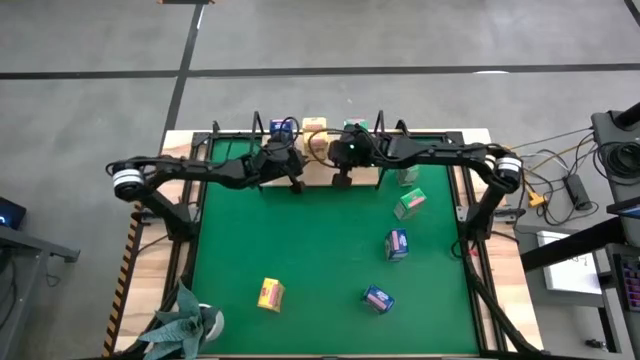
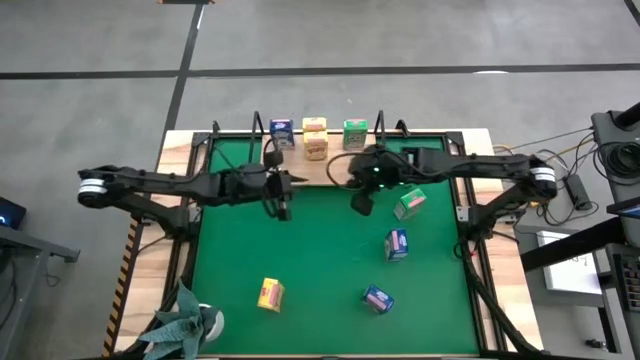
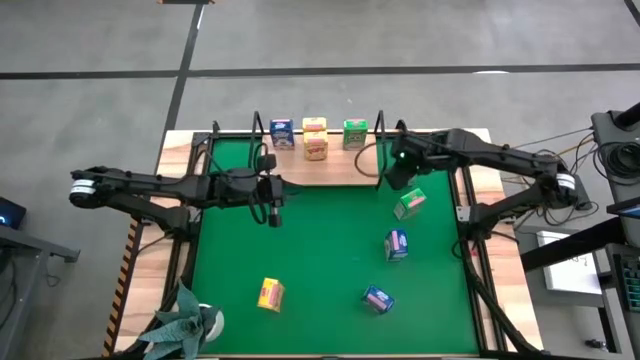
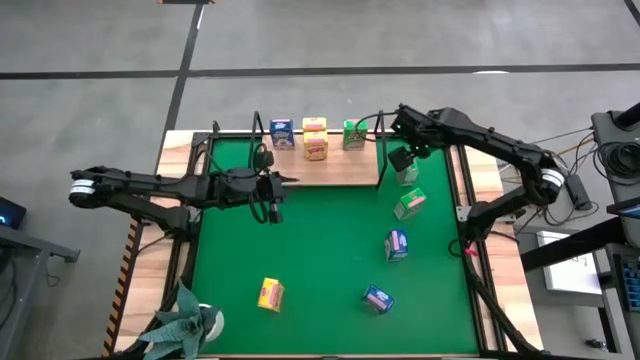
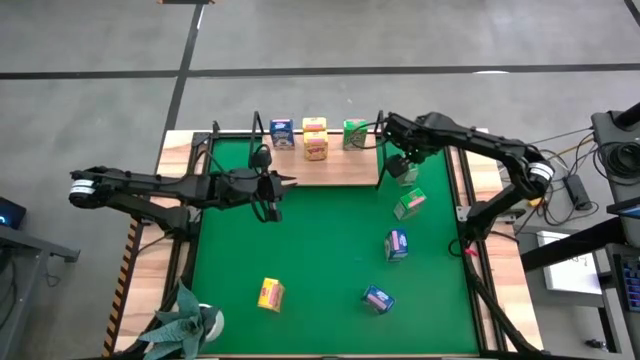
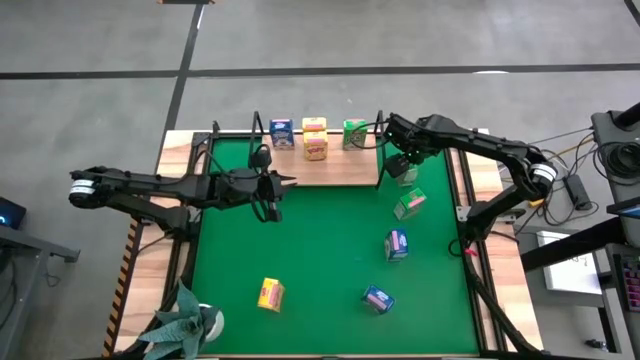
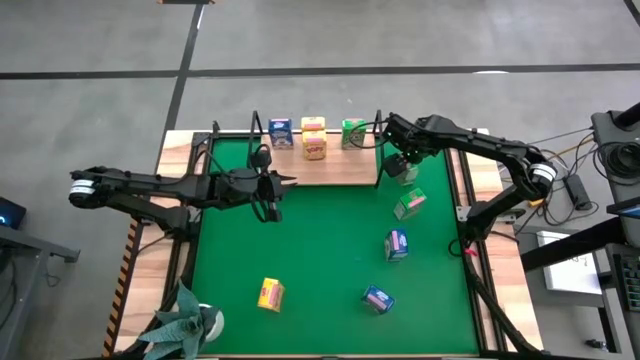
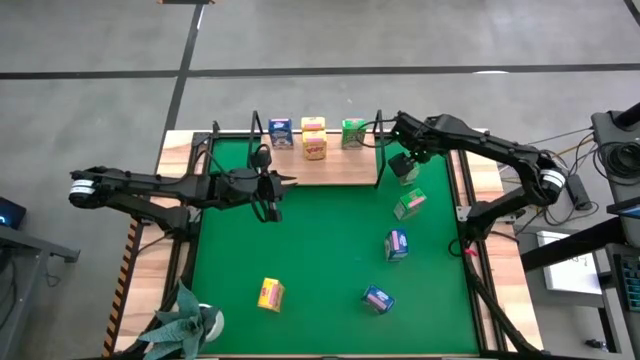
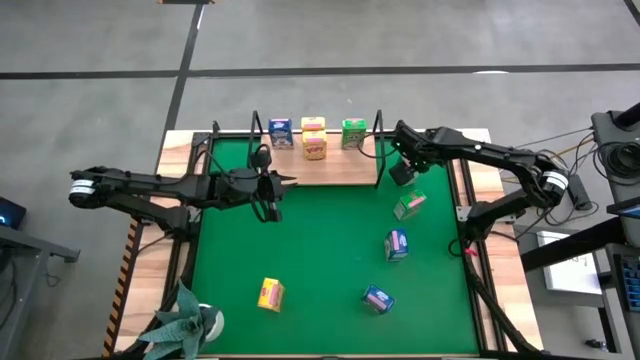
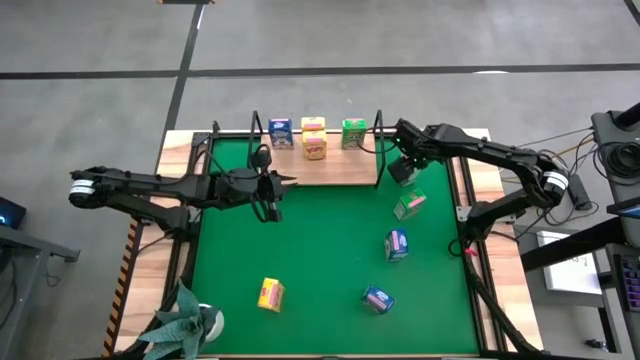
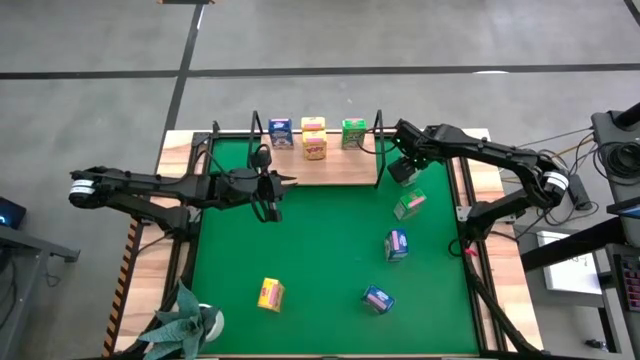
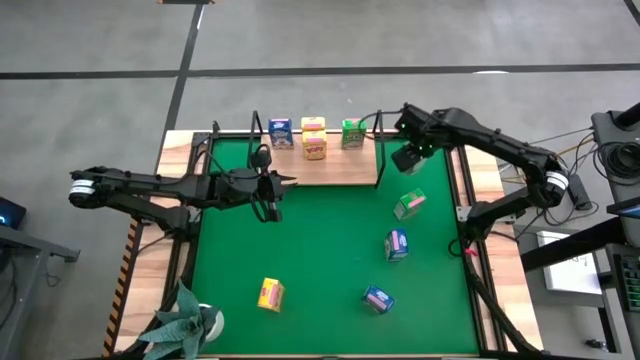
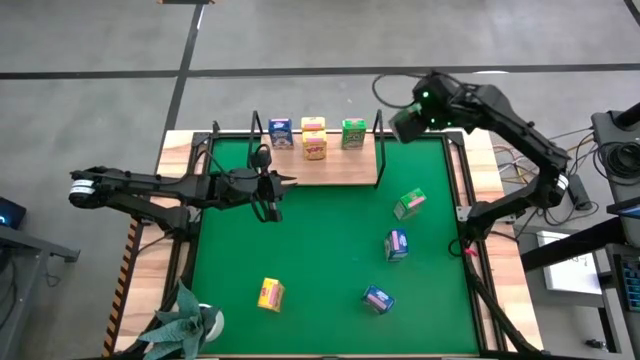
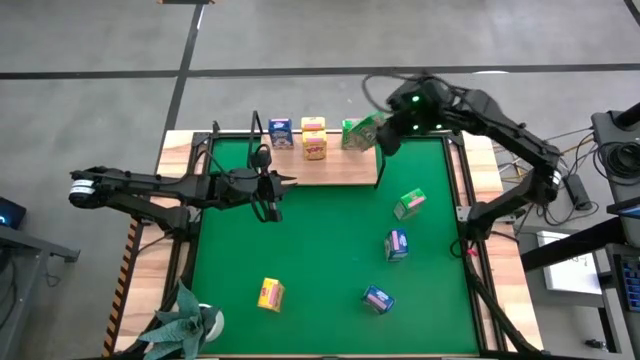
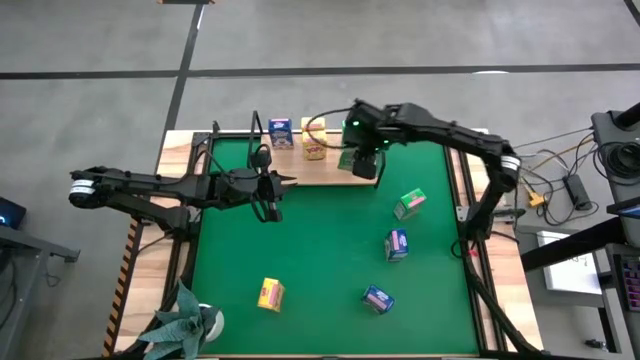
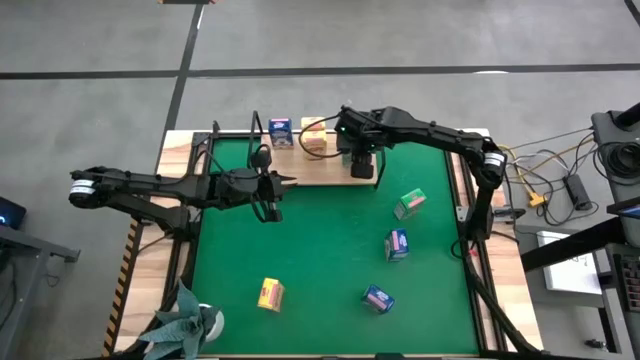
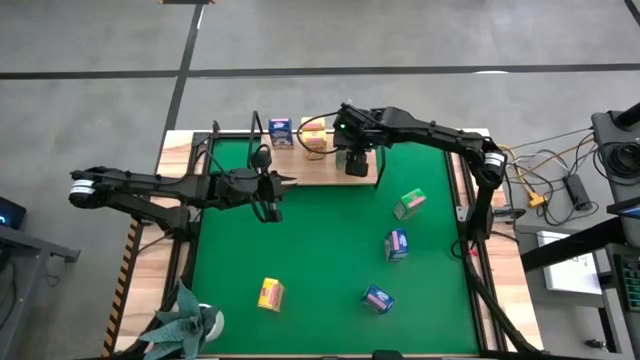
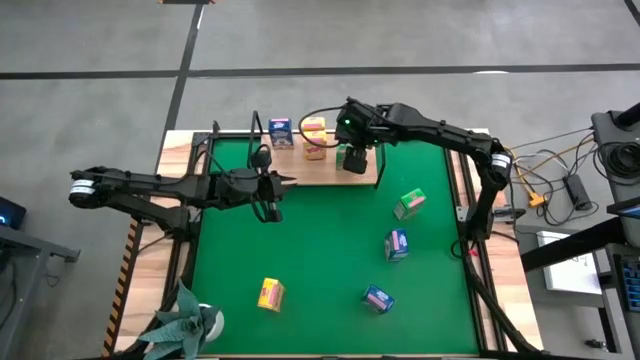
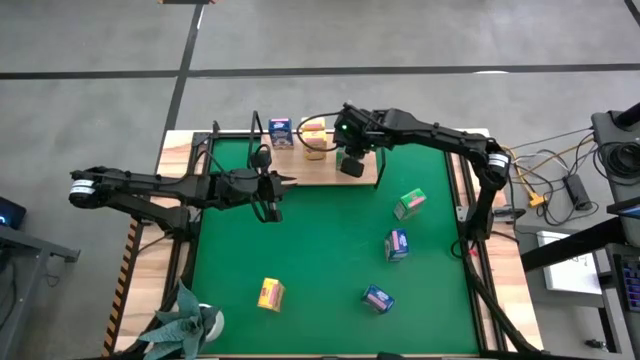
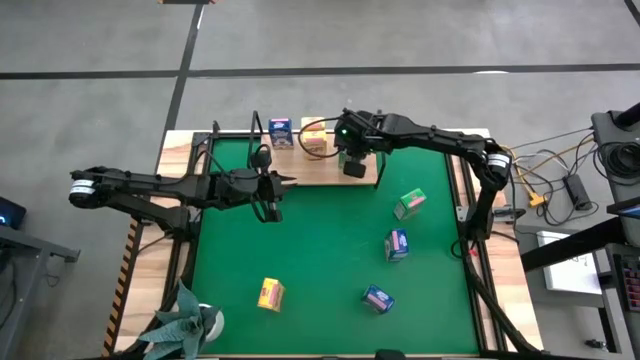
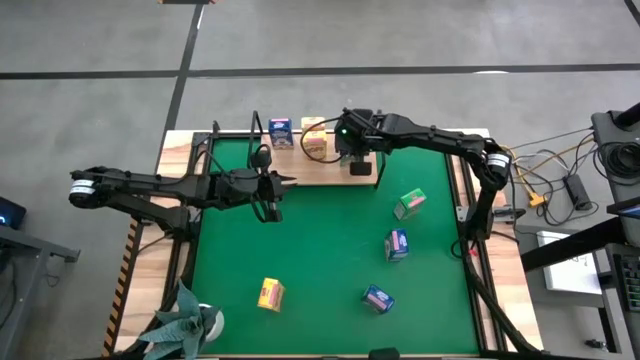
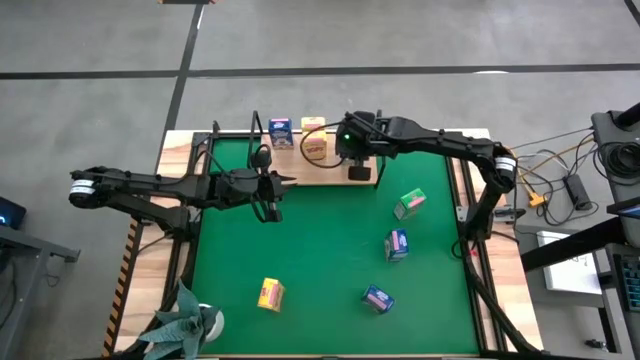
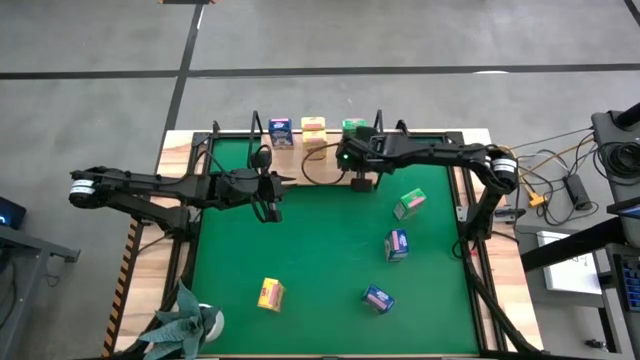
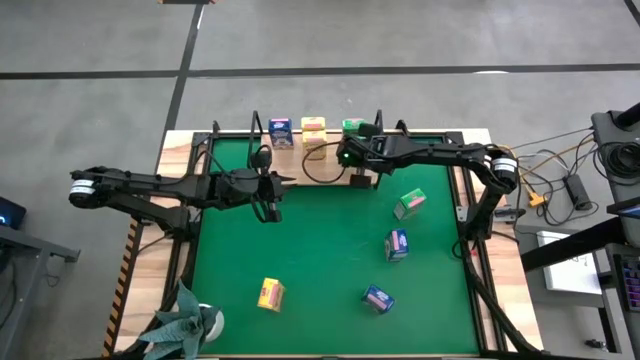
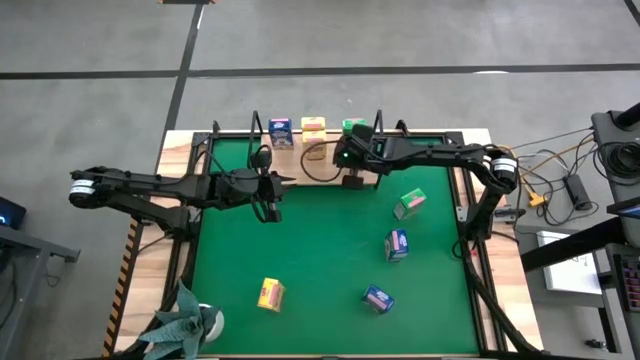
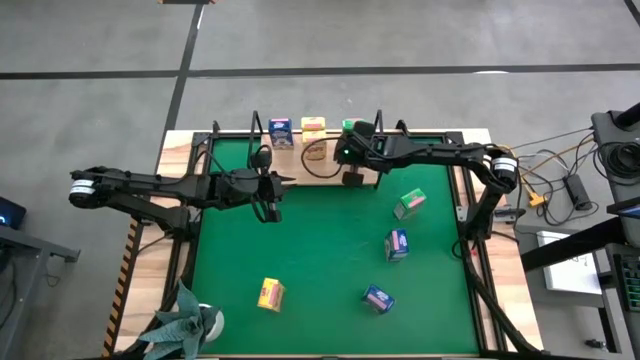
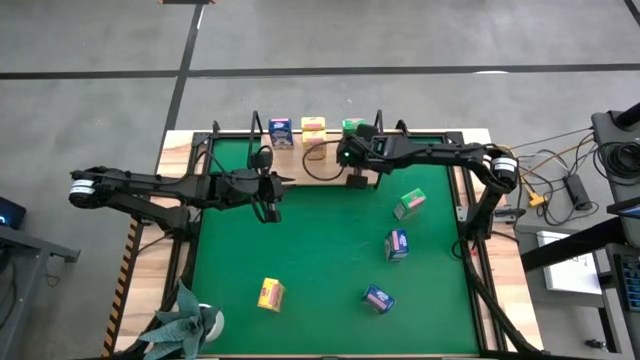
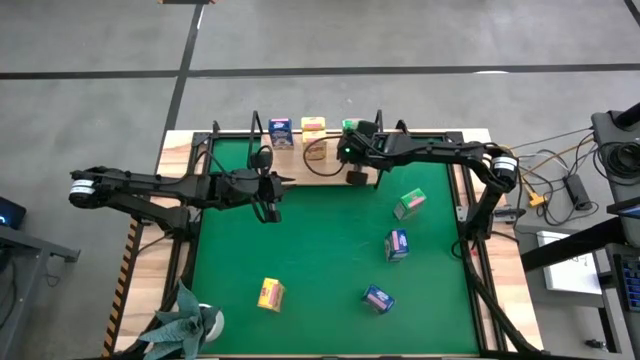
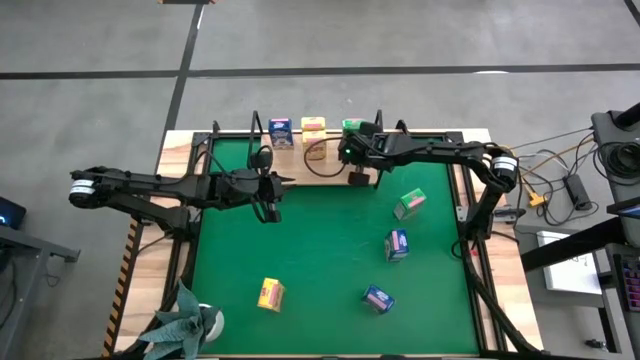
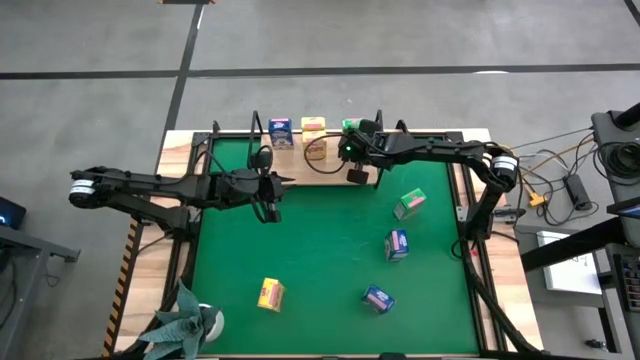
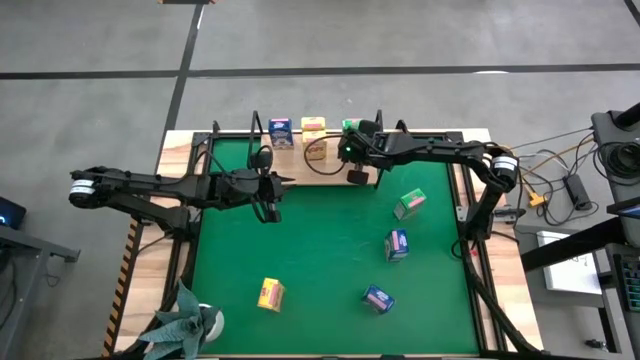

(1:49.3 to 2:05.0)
Task: Stack cereal on shelf
Put the top green cereal box on the shelf aligned with the other green cereal box

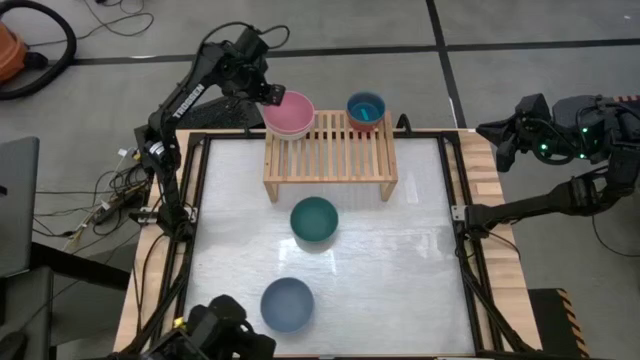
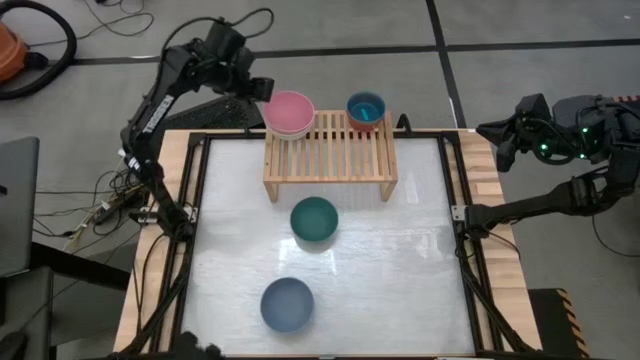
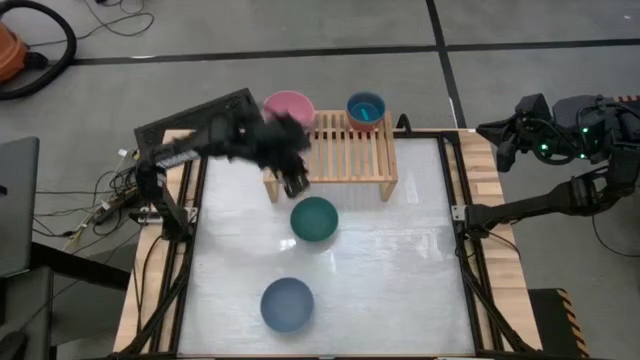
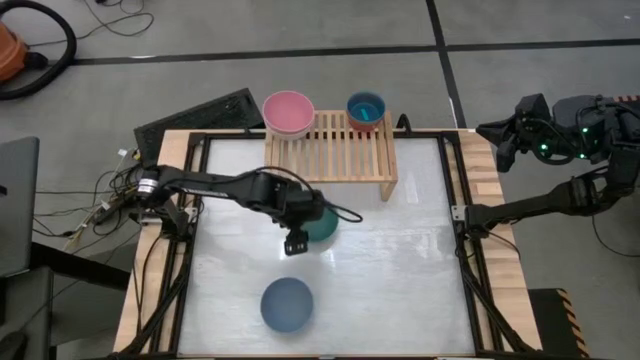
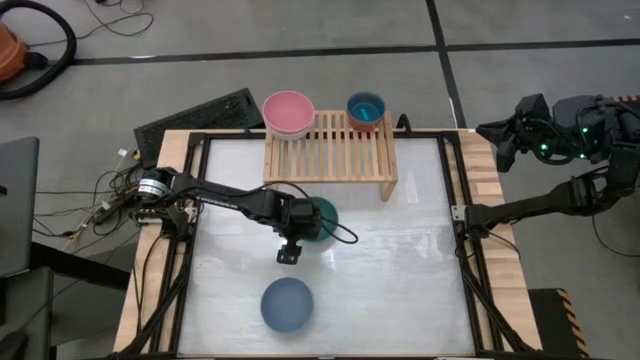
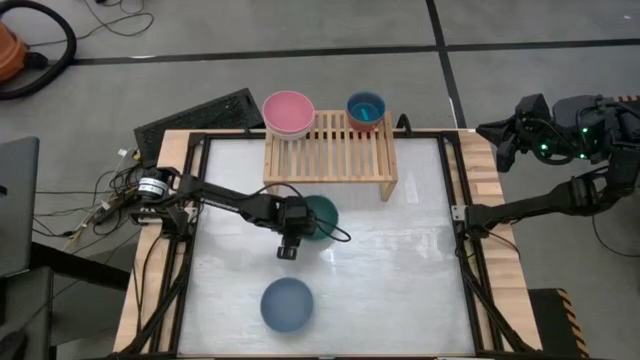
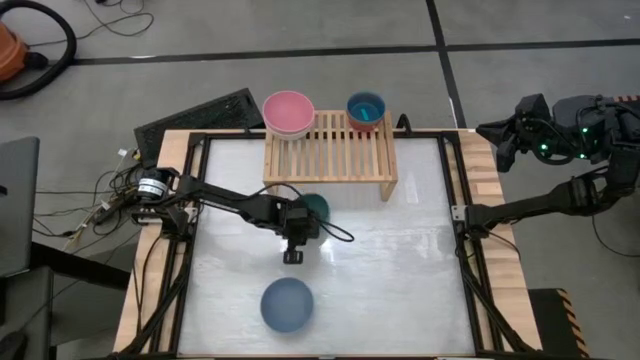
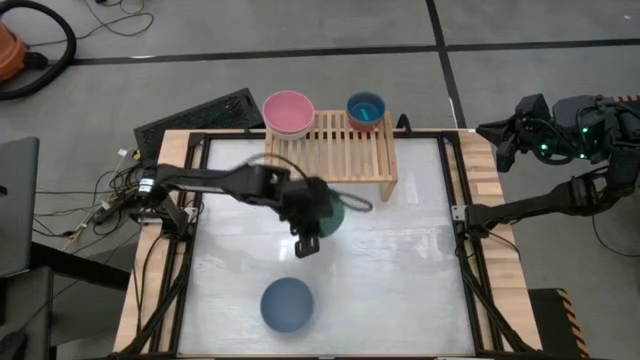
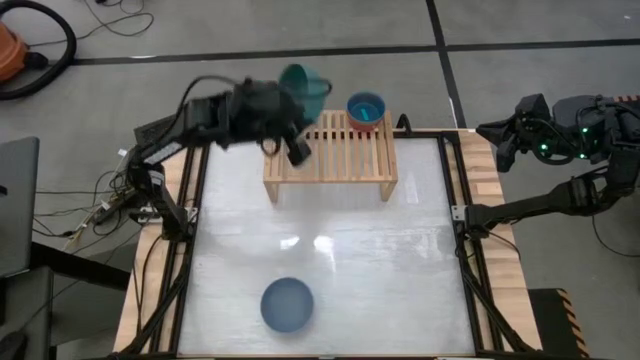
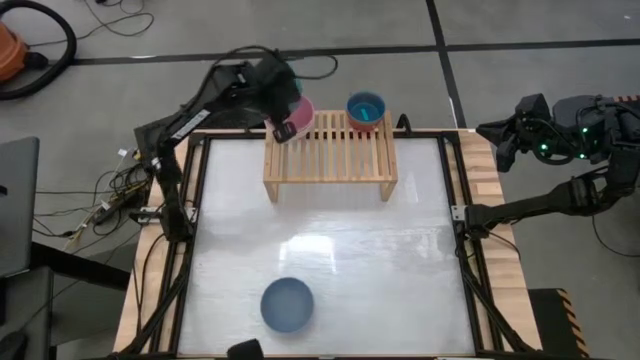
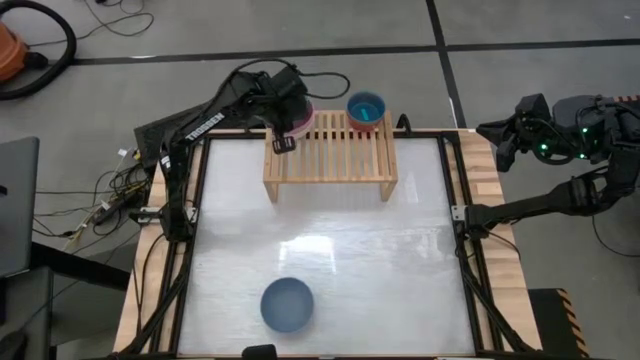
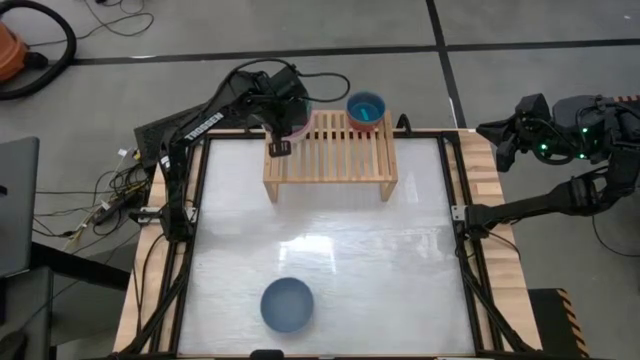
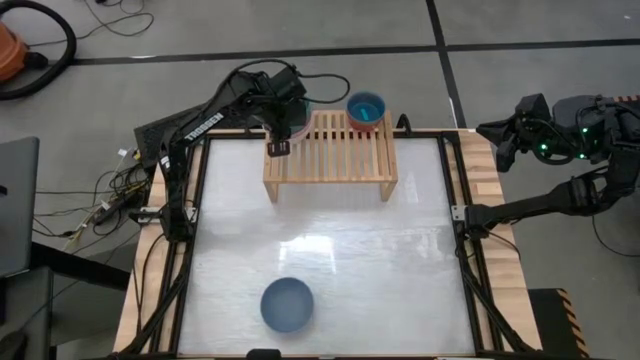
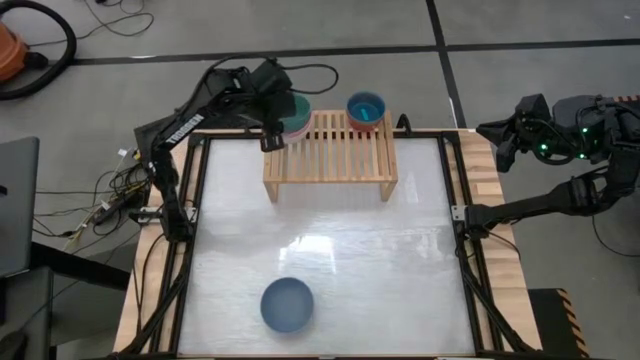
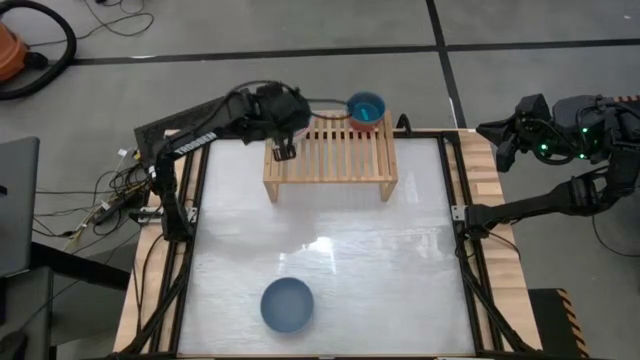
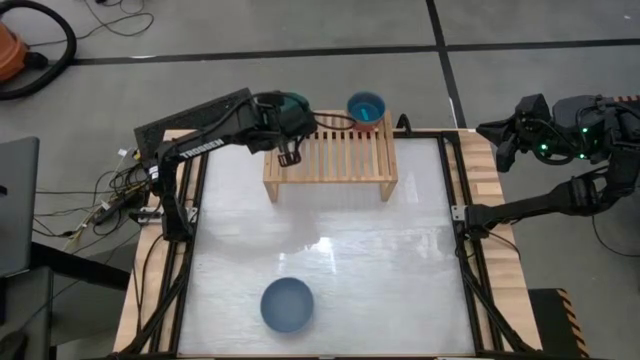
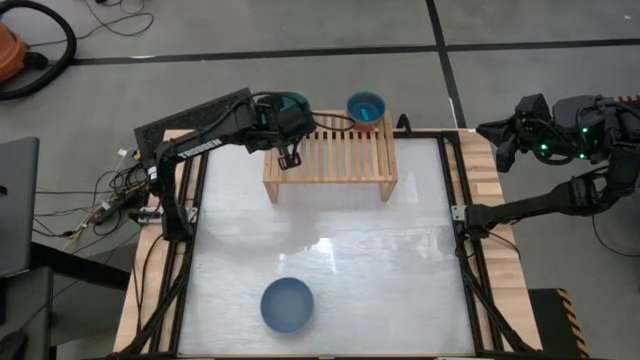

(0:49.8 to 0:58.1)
Task: Place and stack bowls onto a shelf
Stack the large green bowl on top of the large pink bowl
